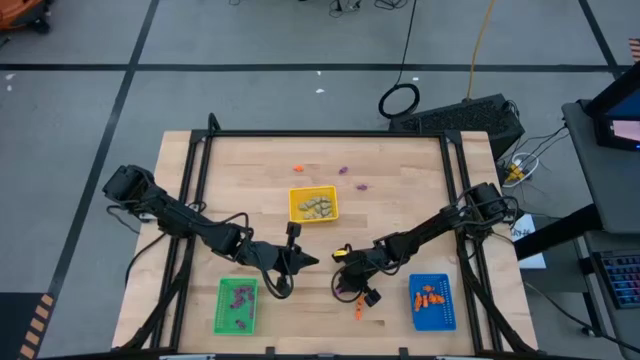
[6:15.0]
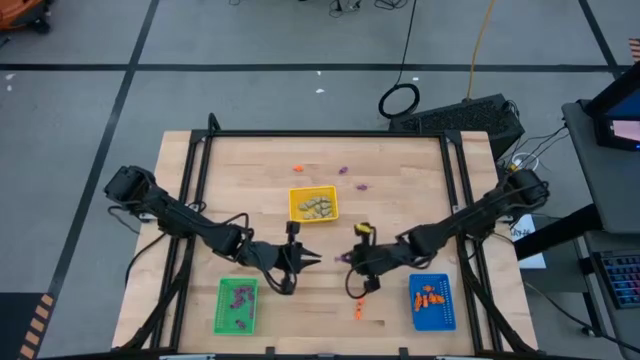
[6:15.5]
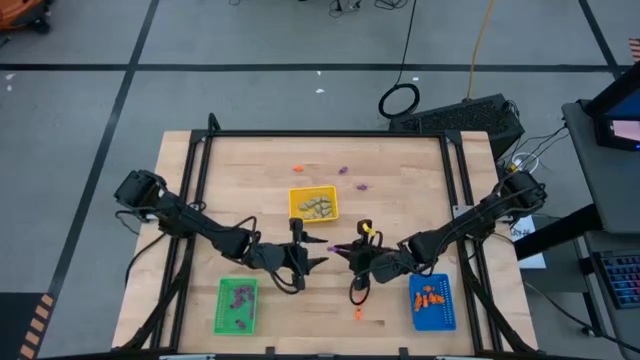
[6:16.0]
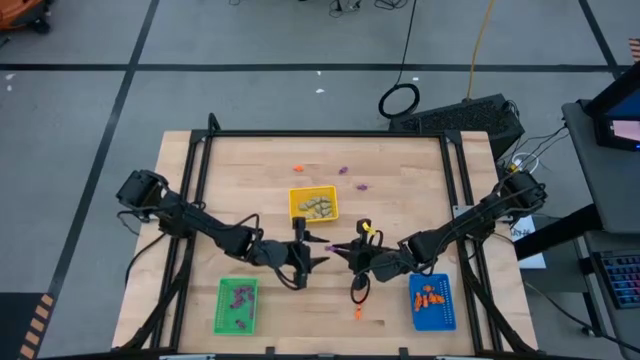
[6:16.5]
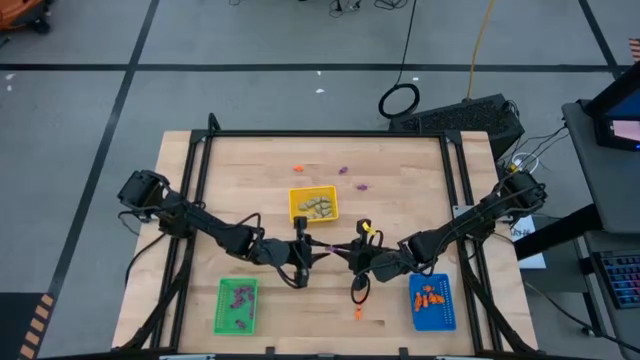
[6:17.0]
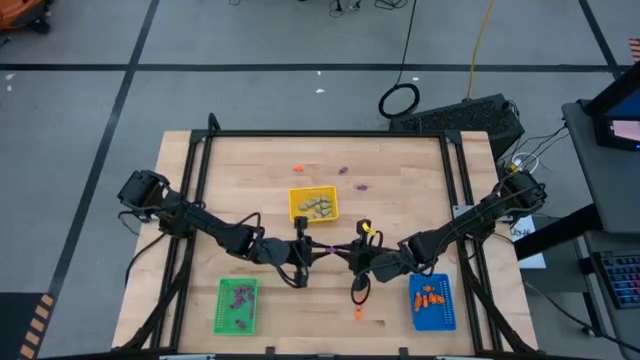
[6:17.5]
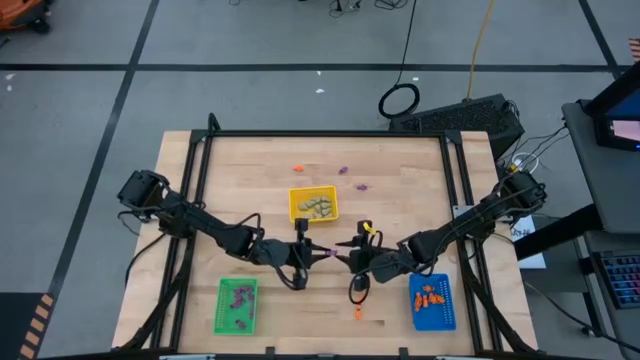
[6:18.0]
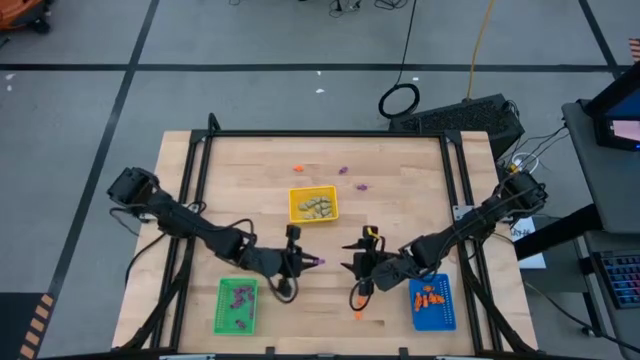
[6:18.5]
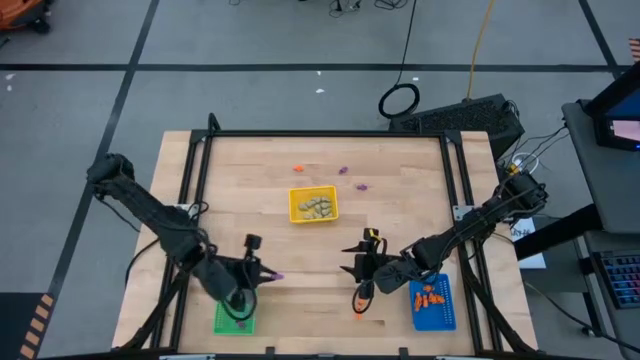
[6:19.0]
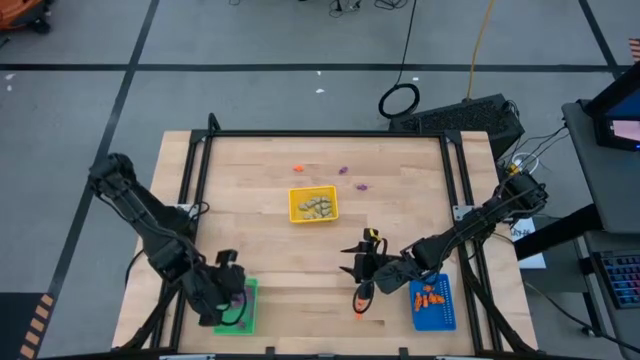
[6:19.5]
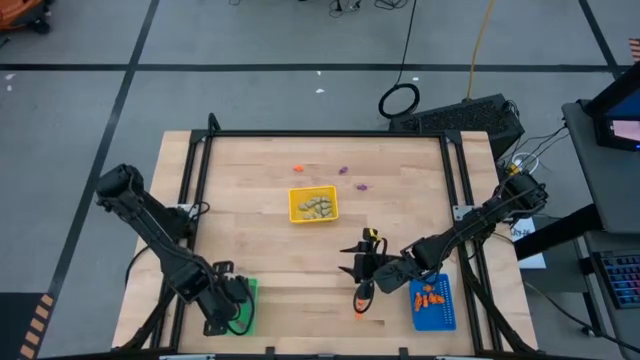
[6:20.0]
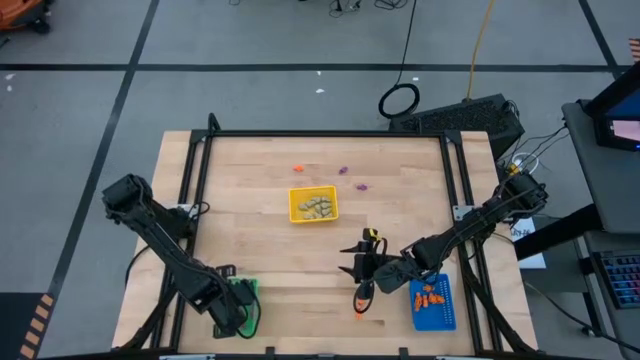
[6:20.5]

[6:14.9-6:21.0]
Task: Sort Halloween decoration
Put the purple skeleton toy in the green basket

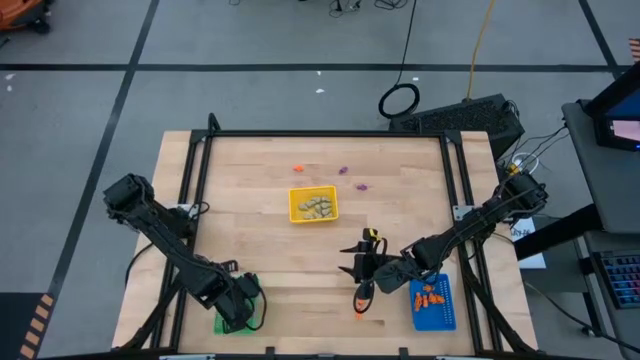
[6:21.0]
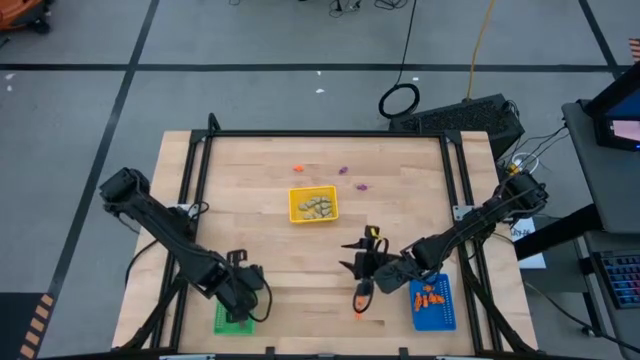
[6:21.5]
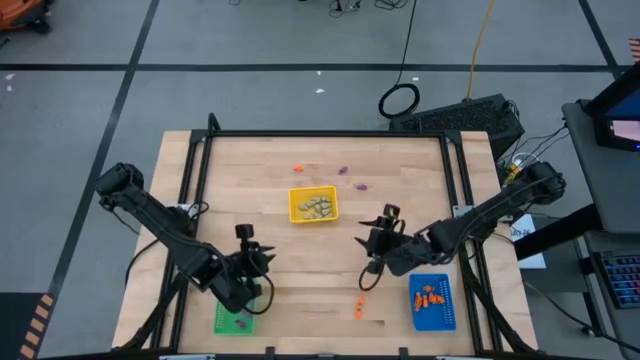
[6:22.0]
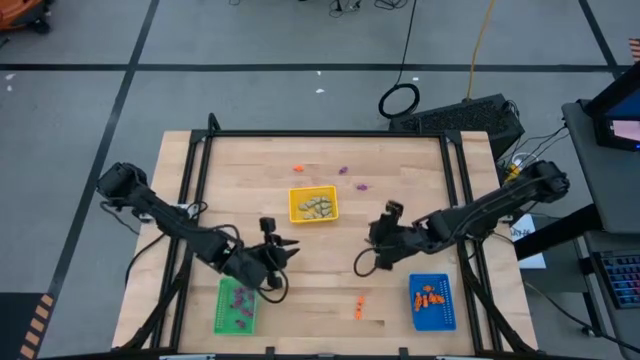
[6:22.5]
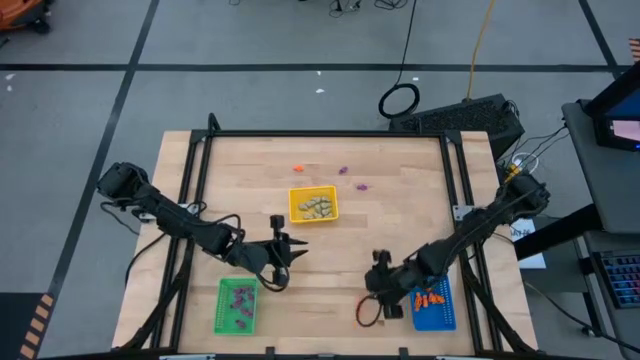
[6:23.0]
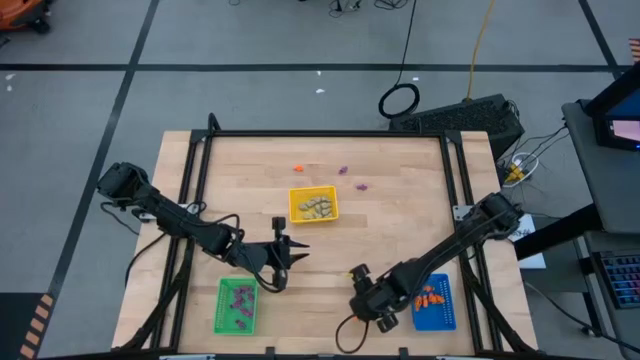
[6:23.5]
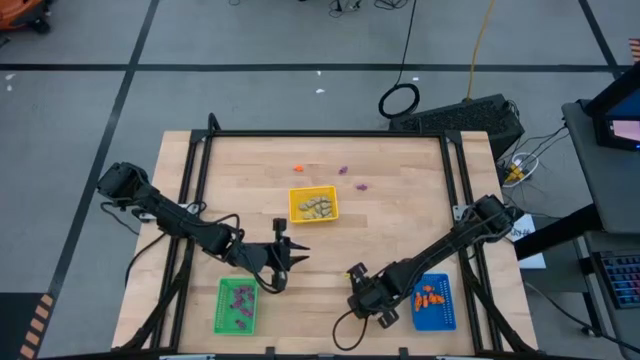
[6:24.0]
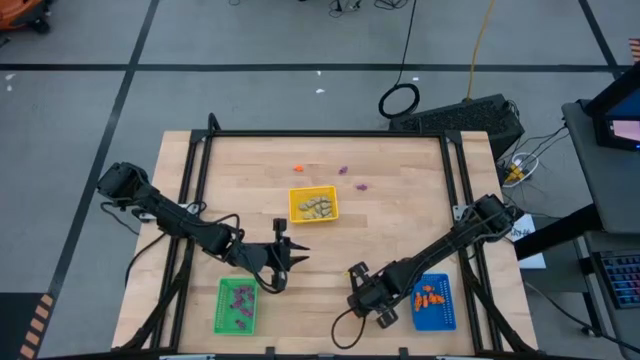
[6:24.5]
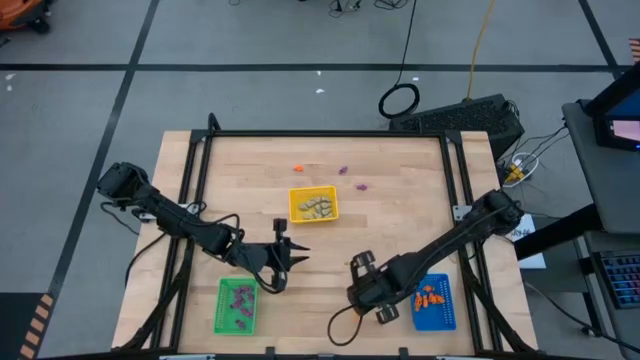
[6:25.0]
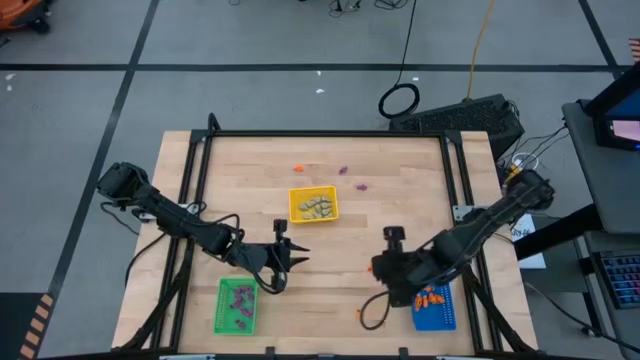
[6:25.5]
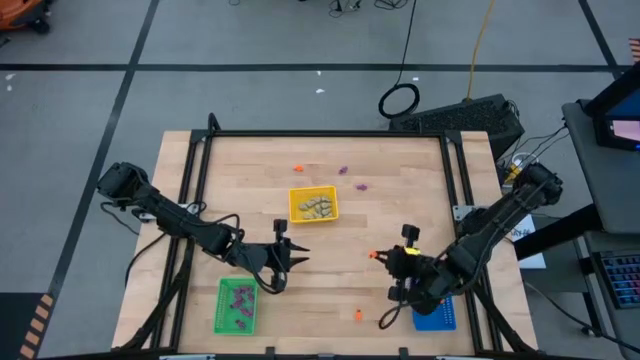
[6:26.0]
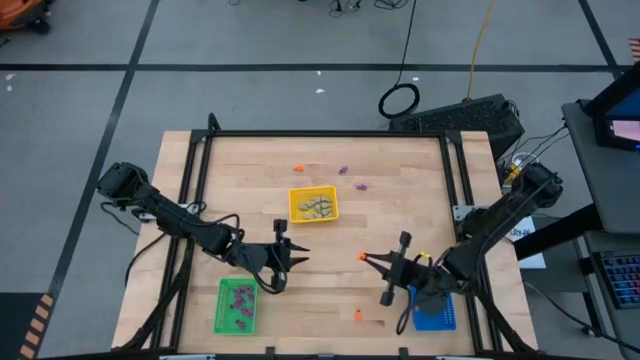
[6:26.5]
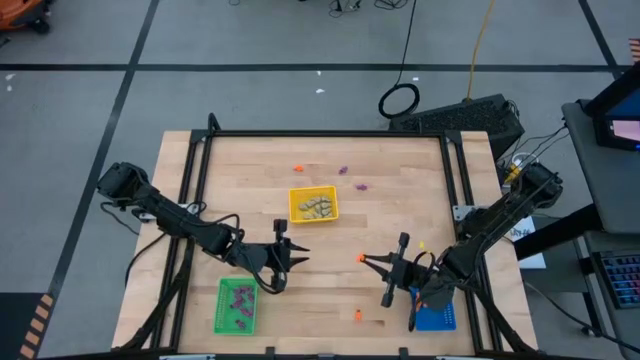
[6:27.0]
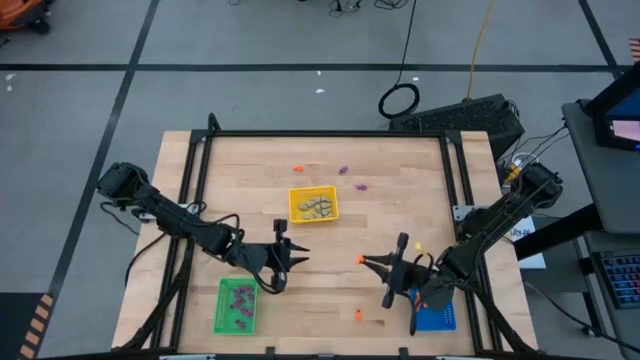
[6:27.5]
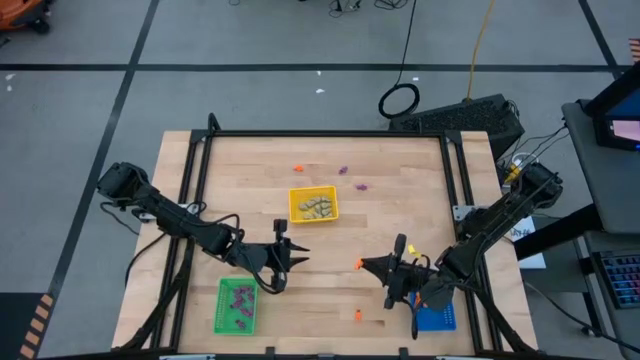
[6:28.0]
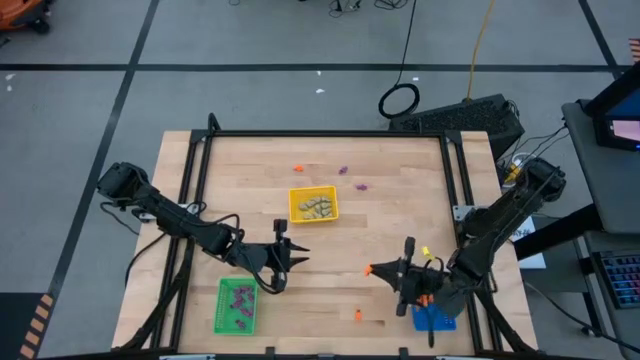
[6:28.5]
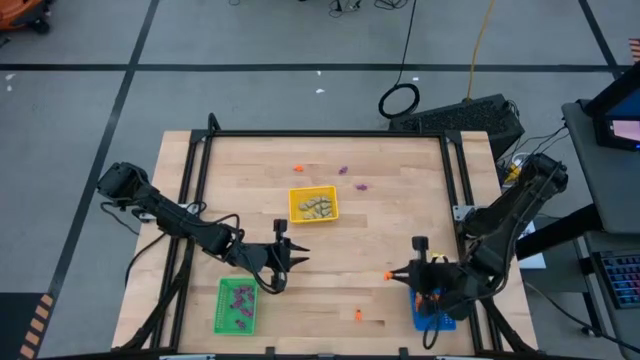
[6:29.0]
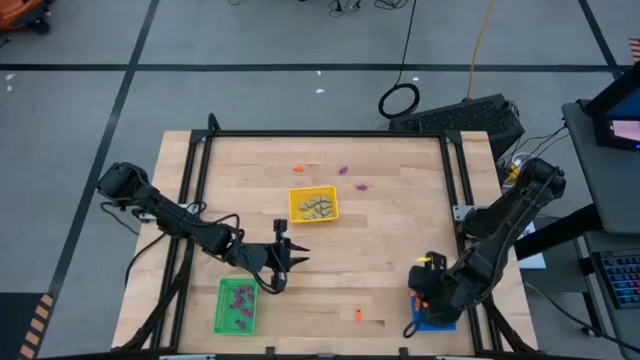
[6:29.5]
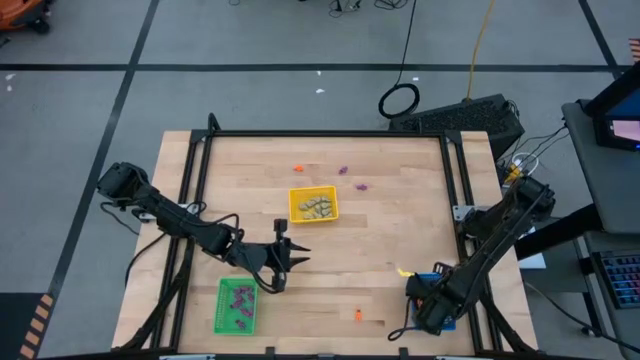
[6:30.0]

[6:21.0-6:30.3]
Put the orange skeleton toy in the blue basket
